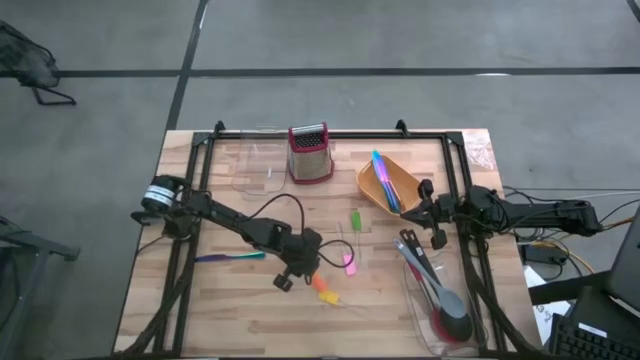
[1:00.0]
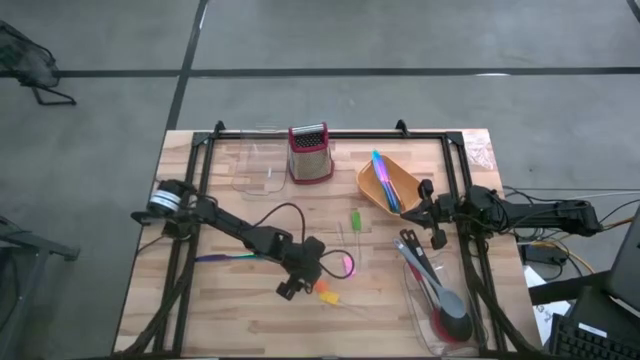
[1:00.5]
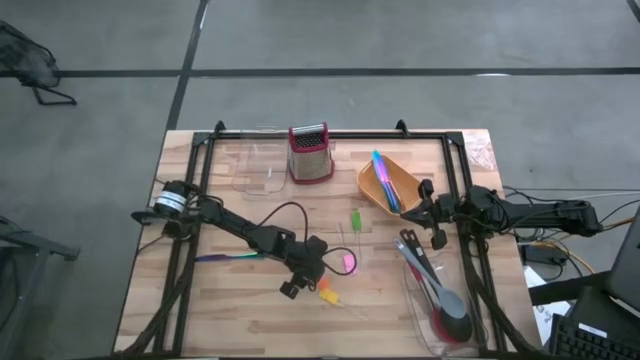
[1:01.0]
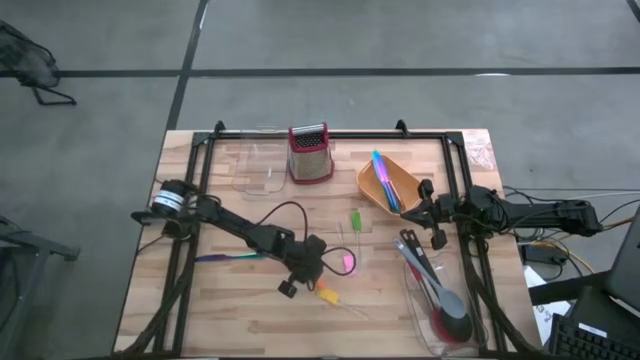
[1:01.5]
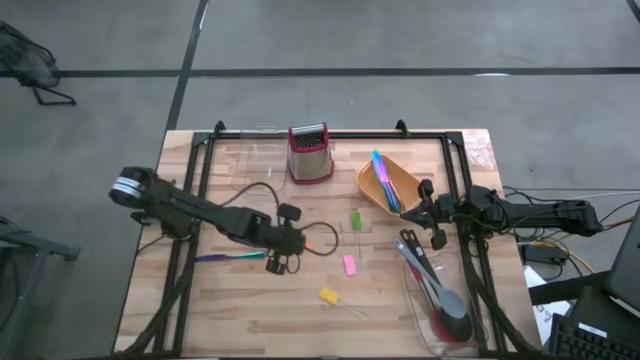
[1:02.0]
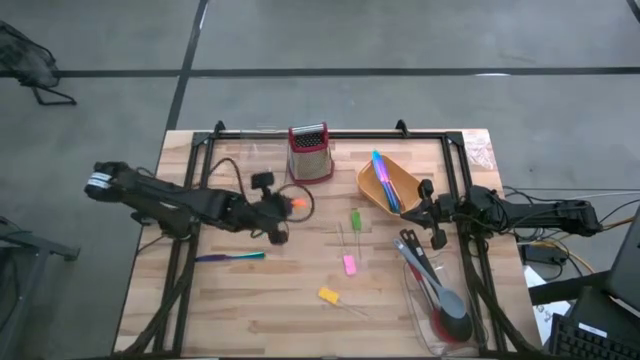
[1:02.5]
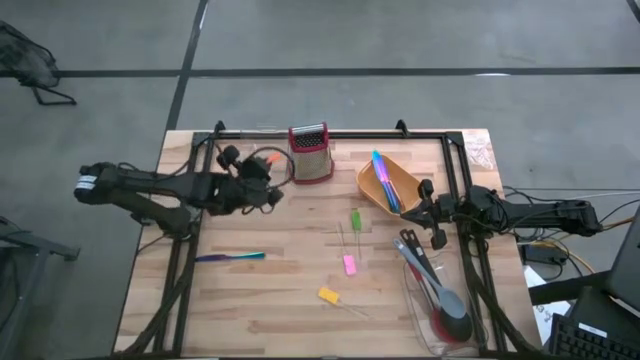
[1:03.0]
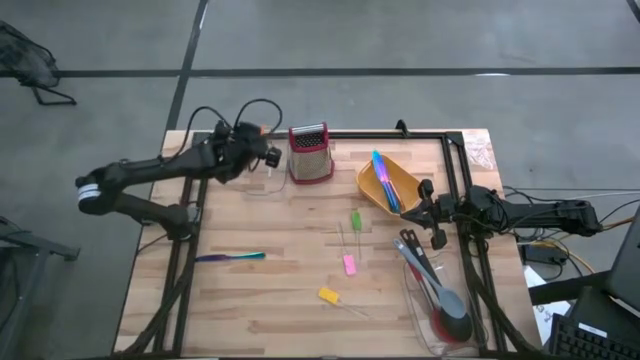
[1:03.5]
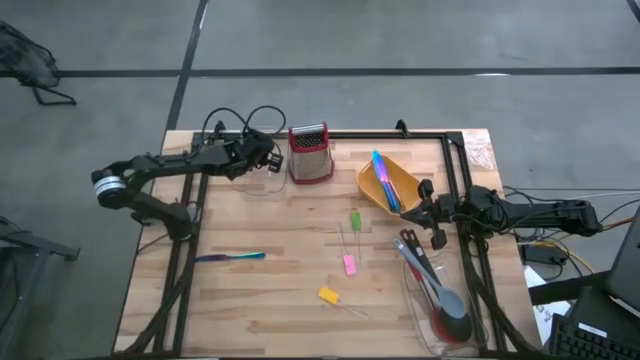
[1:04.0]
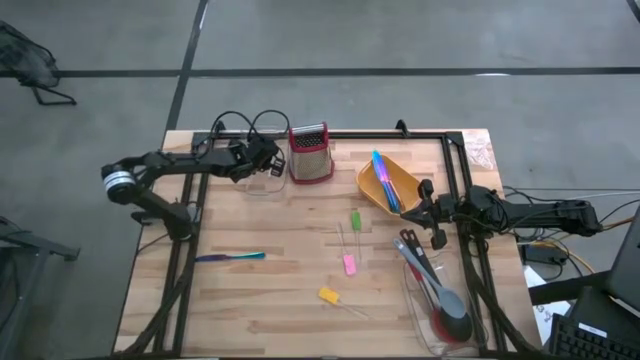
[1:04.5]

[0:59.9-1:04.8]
Task: Pick & Place Kitchen Items
Put the orange spatula into the top transparent bin

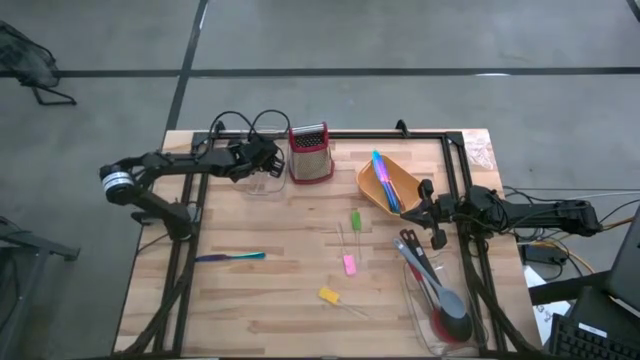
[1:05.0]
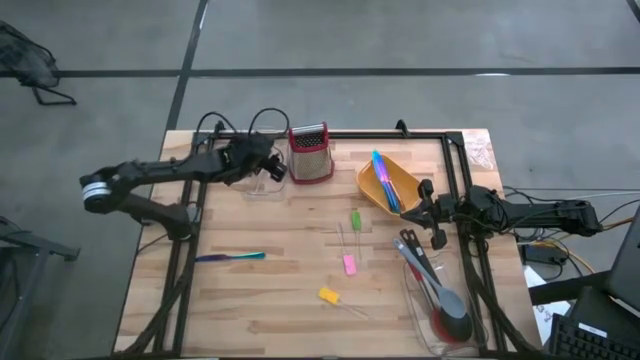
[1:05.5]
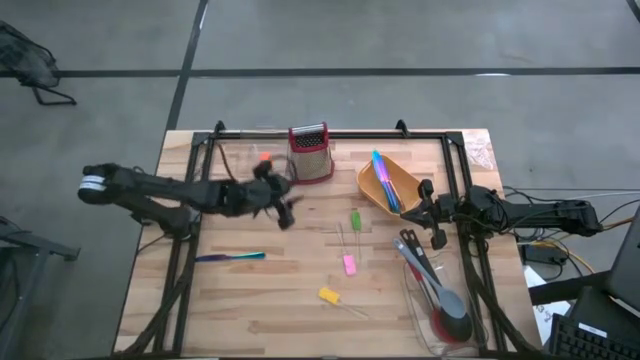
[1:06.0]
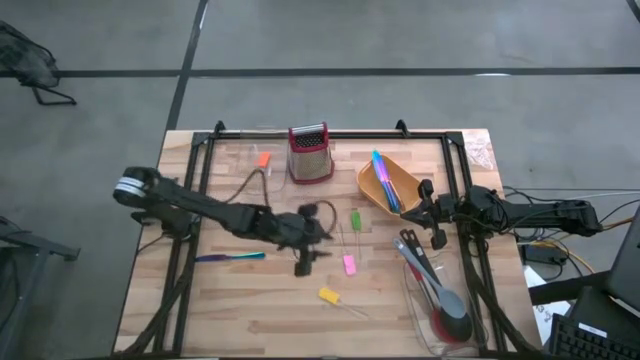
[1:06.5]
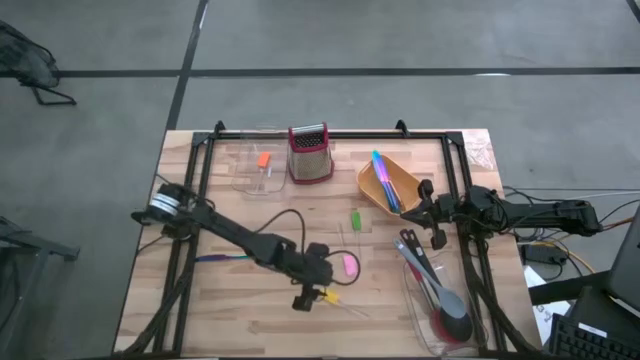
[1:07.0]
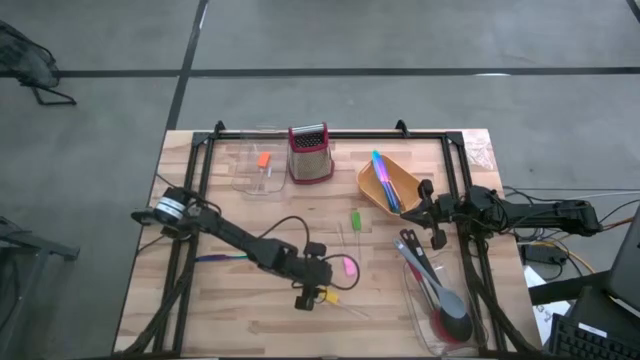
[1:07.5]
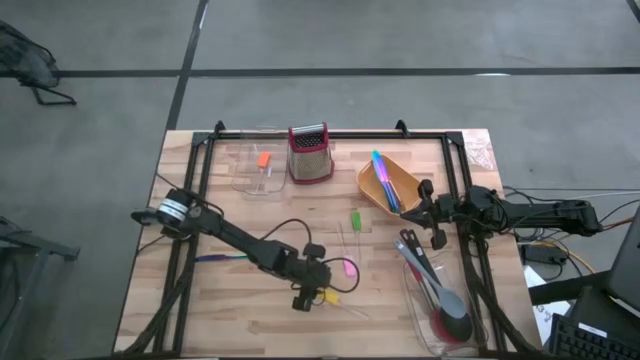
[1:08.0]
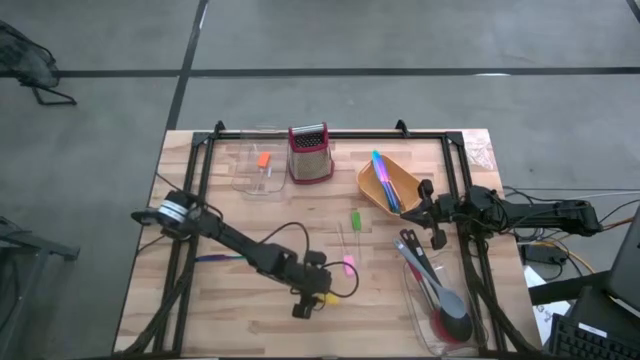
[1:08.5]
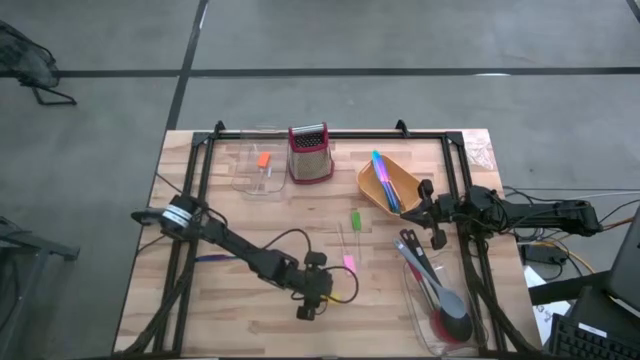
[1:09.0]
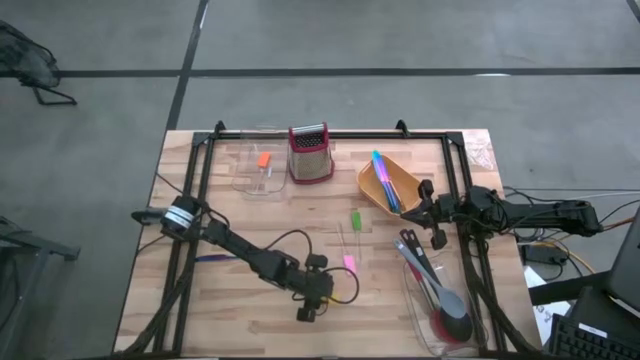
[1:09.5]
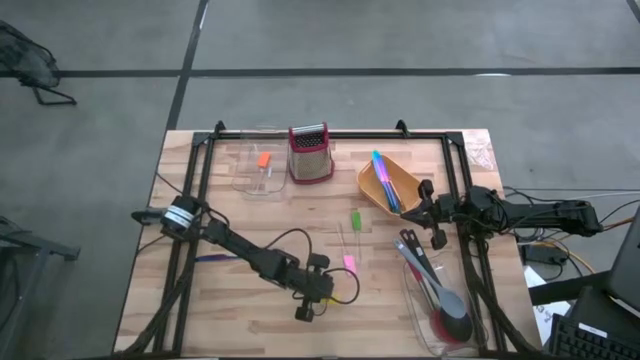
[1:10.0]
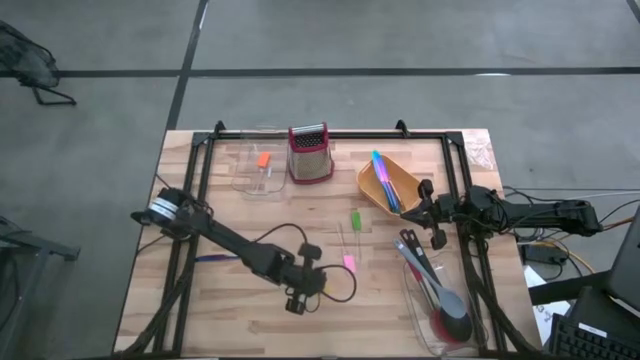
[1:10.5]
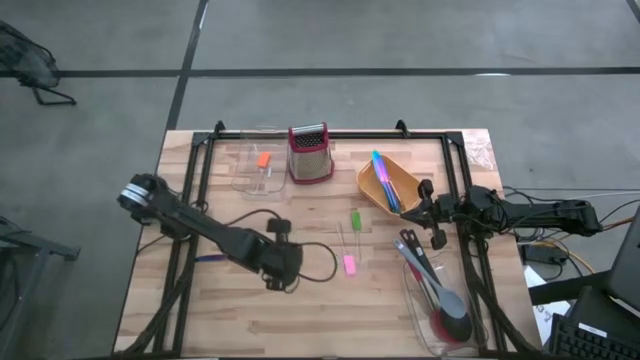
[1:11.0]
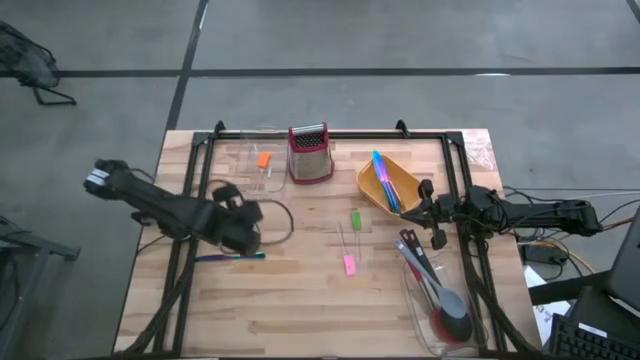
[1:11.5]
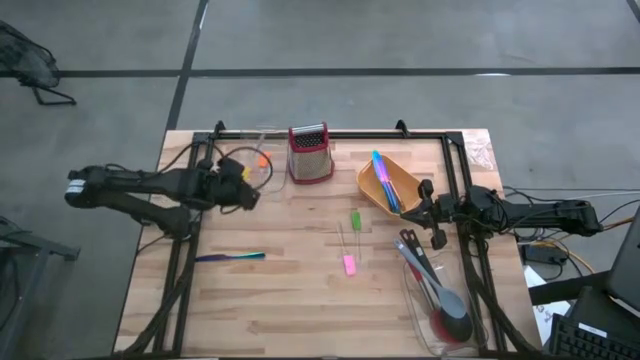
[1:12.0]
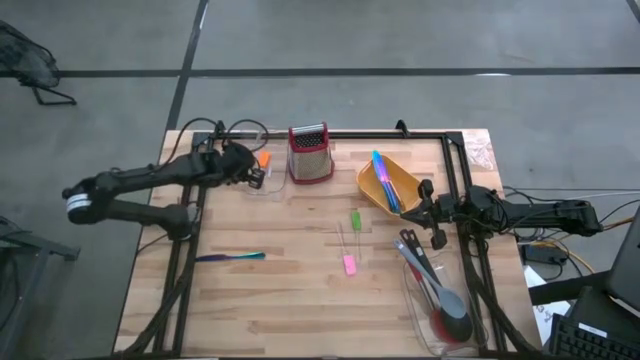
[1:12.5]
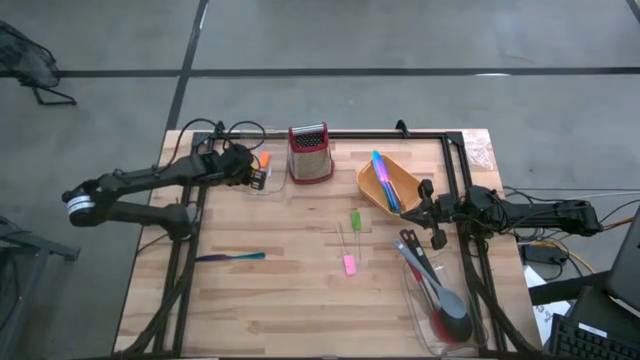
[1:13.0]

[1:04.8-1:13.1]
Put the yellow spatula into the top transparent bin

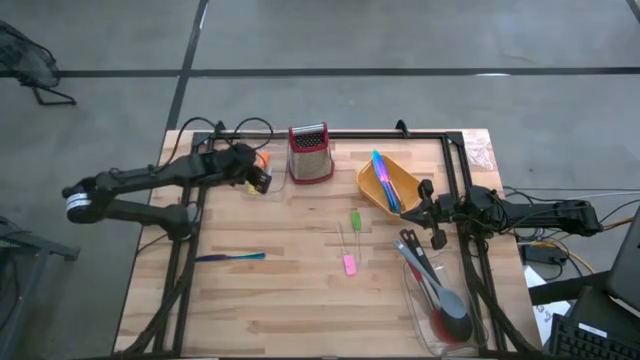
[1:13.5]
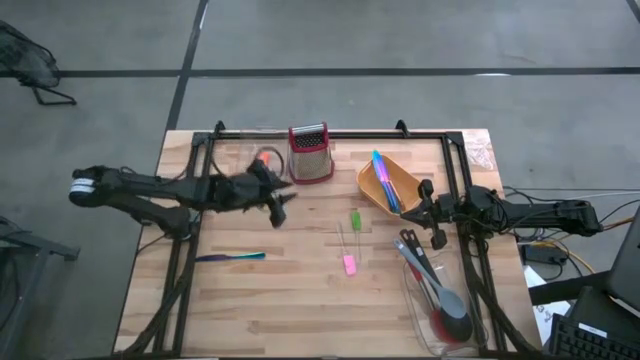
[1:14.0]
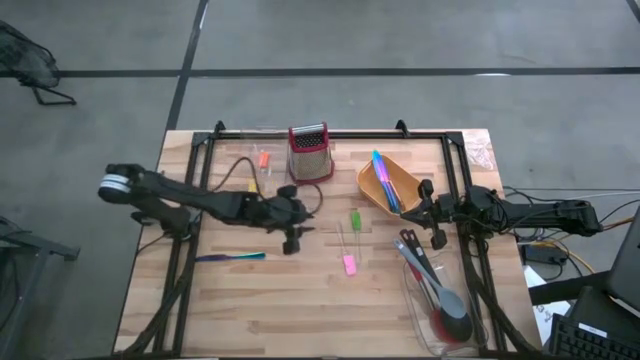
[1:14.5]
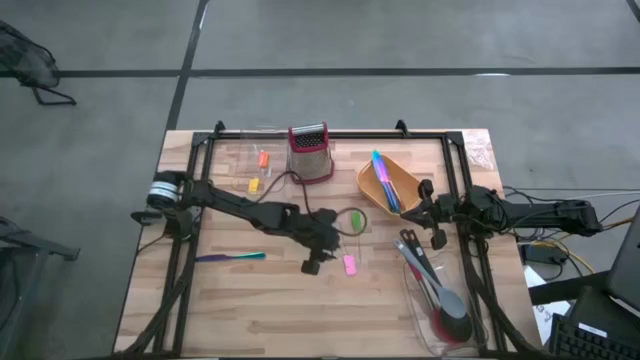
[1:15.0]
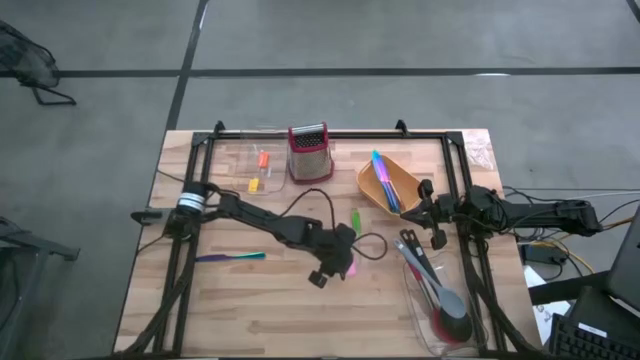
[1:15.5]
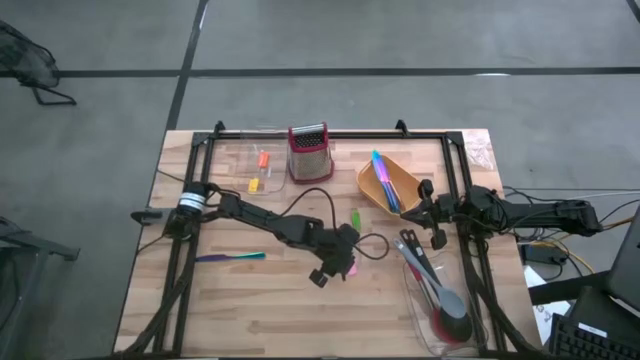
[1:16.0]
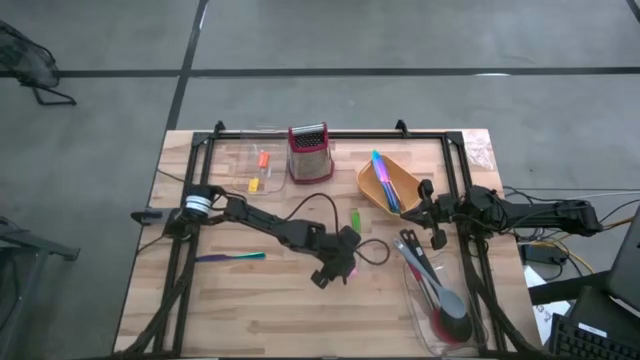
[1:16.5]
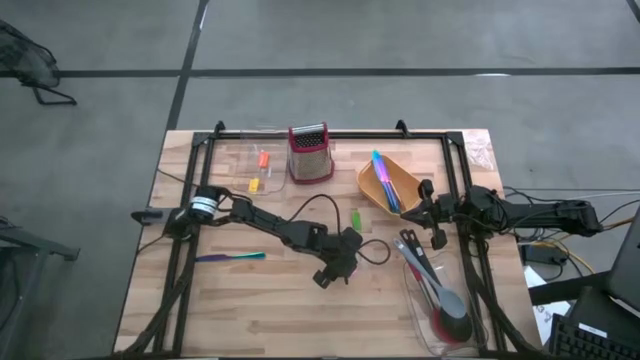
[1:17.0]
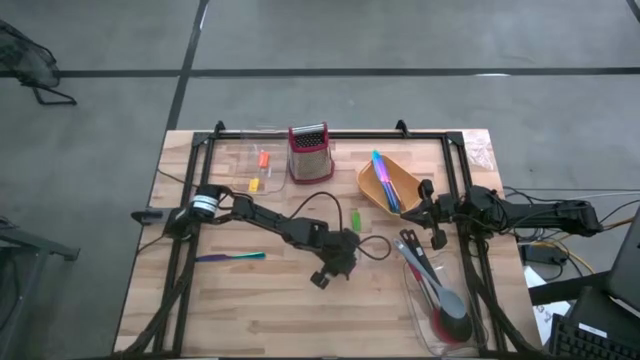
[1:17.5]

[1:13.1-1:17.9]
Put the pink spatula into the top transparent bin

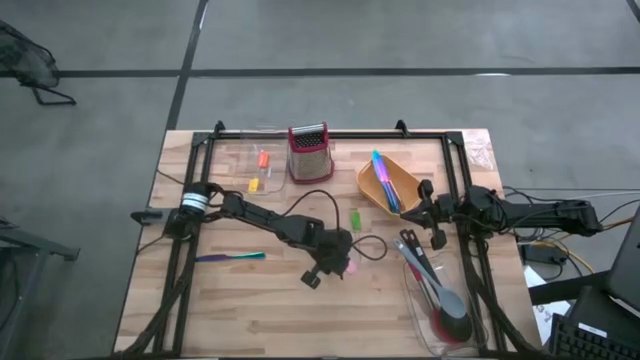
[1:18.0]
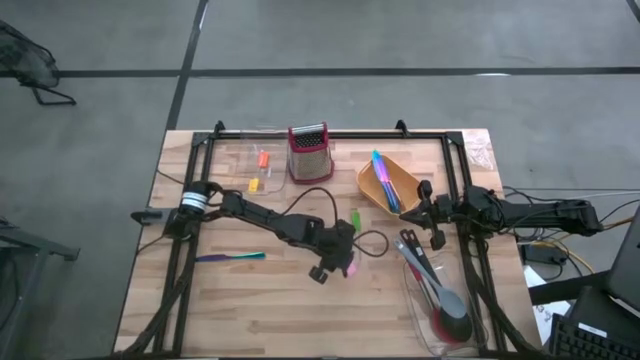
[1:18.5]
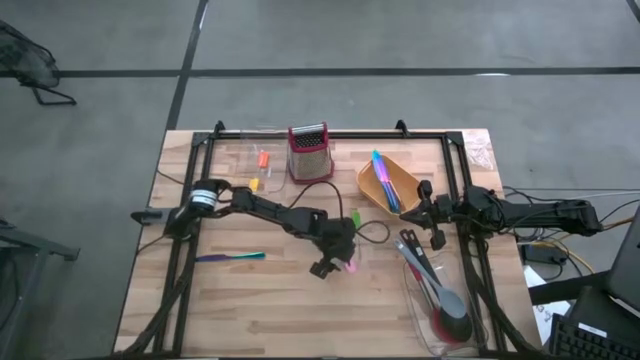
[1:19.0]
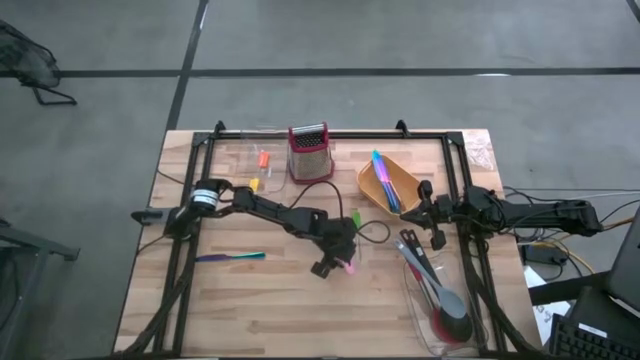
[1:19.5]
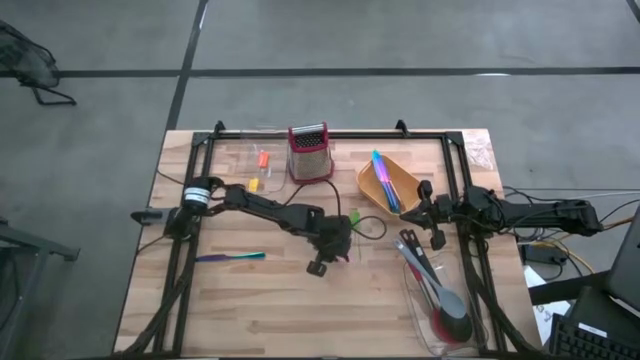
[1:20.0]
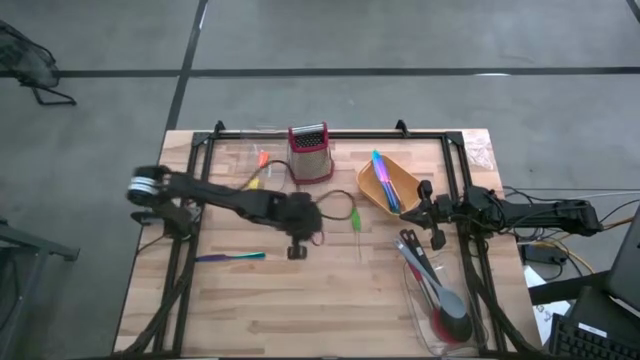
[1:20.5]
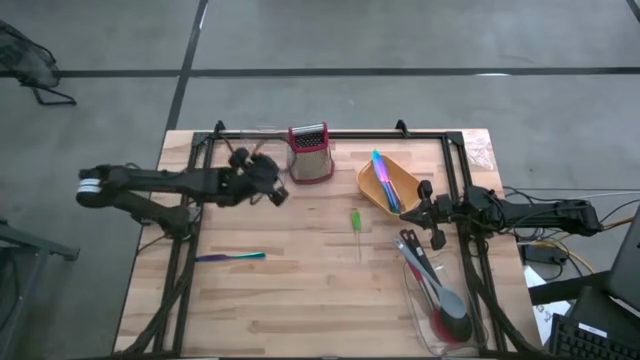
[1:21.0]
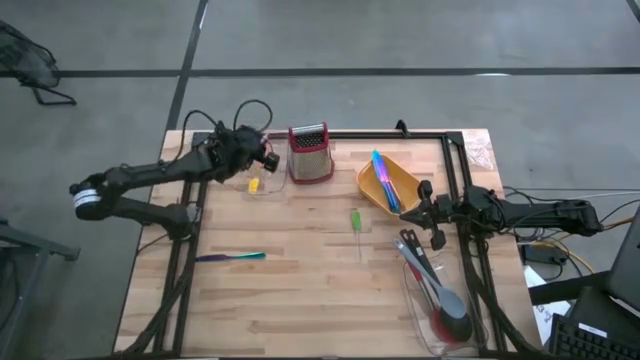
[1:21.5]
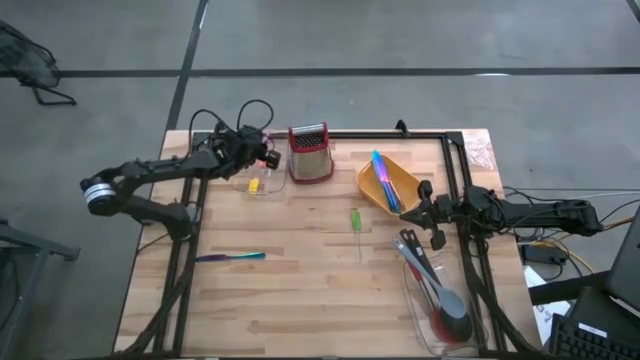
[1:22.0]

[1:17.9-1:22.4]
Put the pink spatula into the top transparent bin
